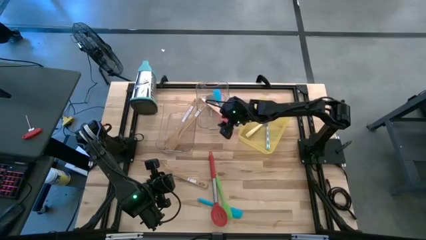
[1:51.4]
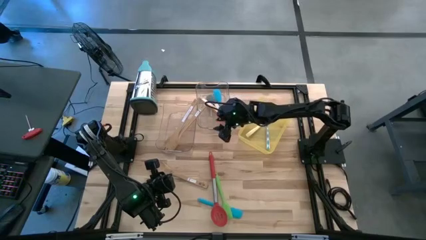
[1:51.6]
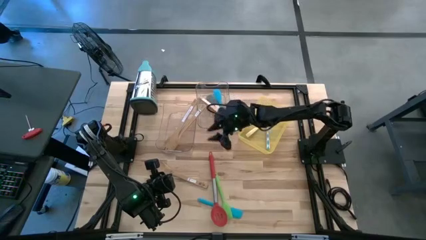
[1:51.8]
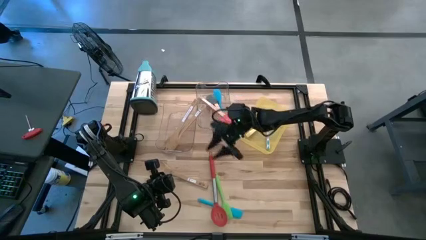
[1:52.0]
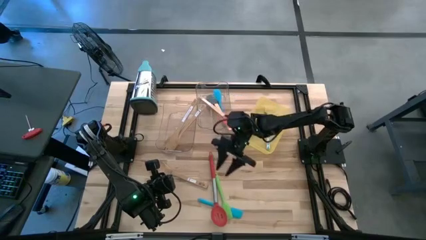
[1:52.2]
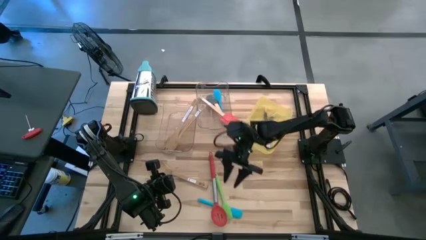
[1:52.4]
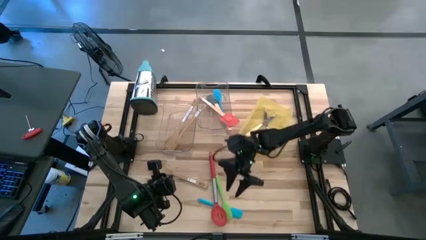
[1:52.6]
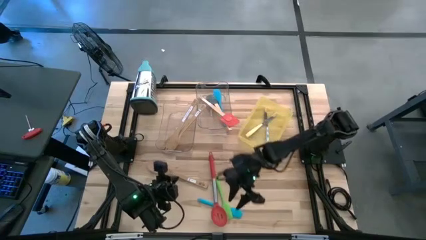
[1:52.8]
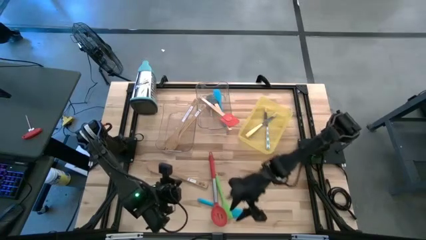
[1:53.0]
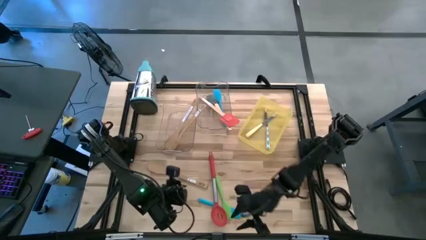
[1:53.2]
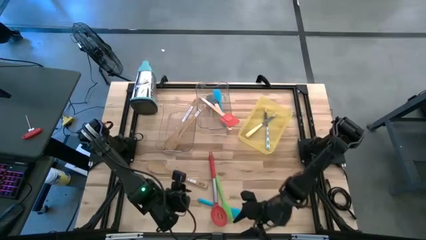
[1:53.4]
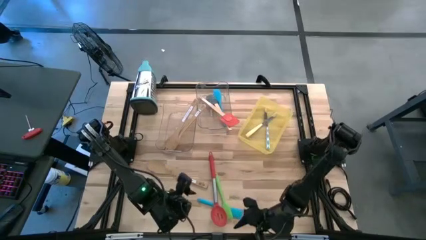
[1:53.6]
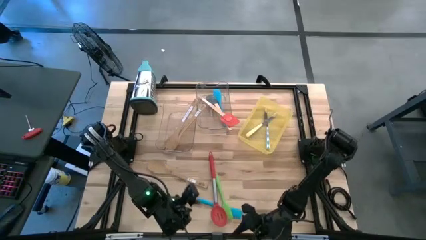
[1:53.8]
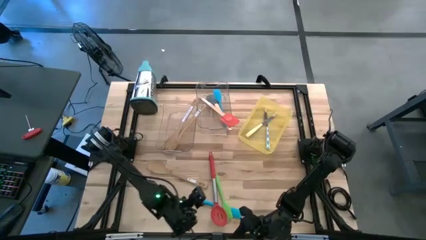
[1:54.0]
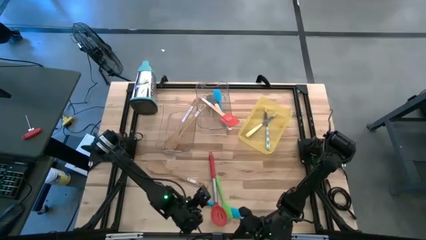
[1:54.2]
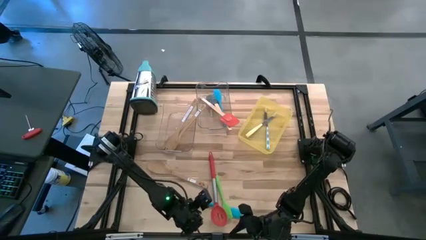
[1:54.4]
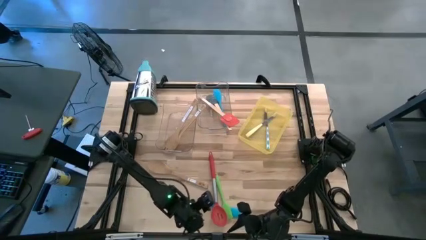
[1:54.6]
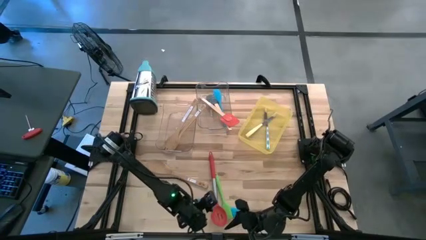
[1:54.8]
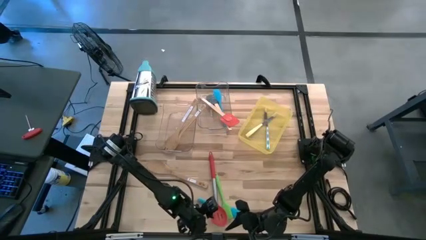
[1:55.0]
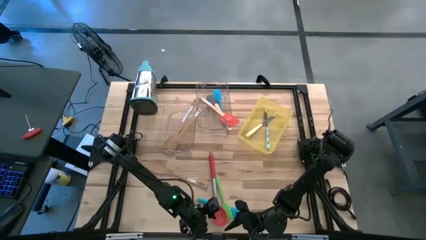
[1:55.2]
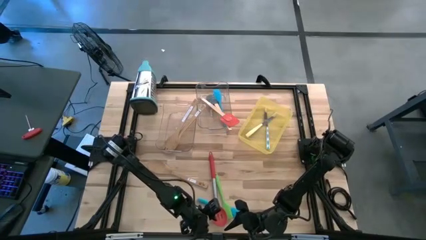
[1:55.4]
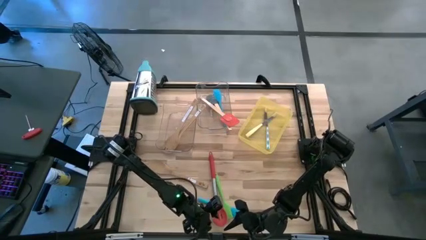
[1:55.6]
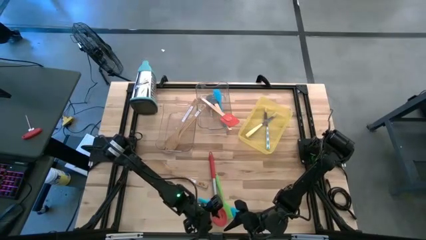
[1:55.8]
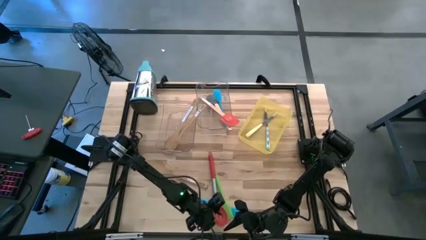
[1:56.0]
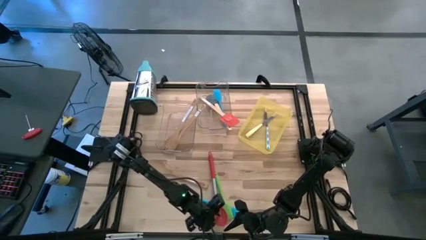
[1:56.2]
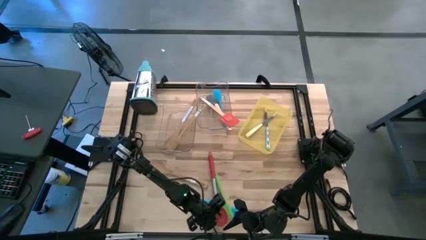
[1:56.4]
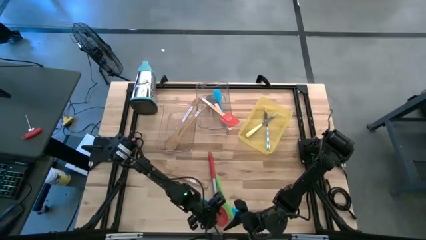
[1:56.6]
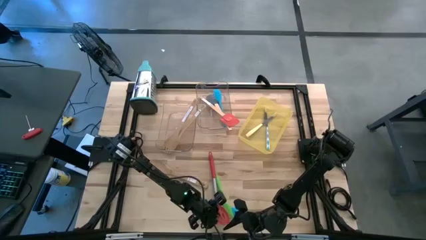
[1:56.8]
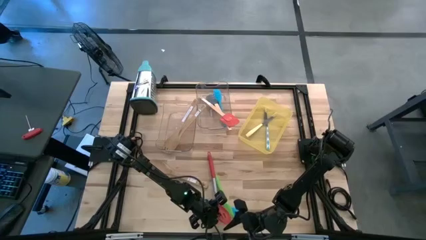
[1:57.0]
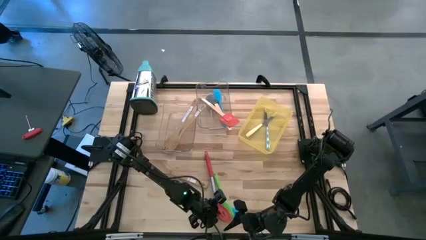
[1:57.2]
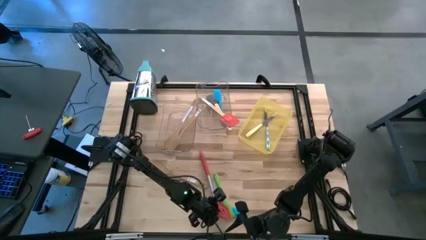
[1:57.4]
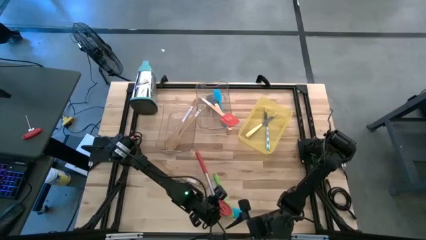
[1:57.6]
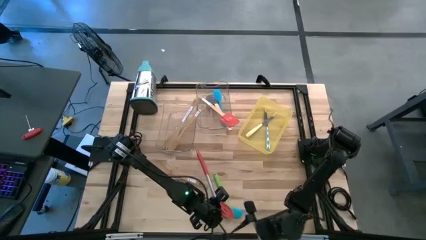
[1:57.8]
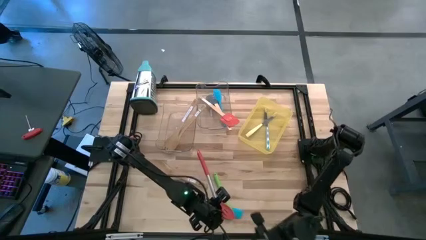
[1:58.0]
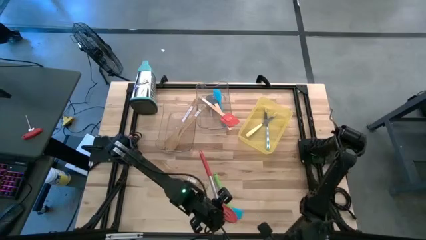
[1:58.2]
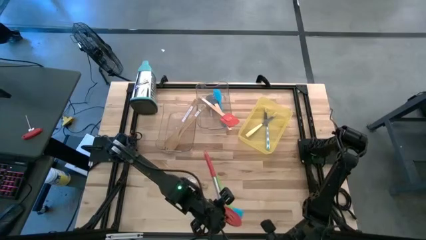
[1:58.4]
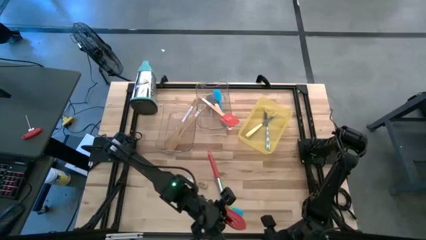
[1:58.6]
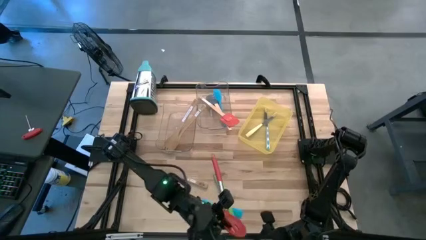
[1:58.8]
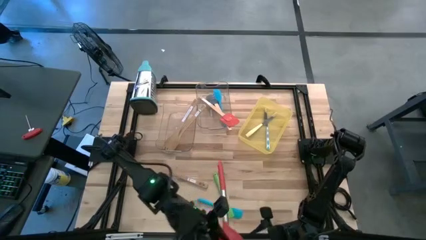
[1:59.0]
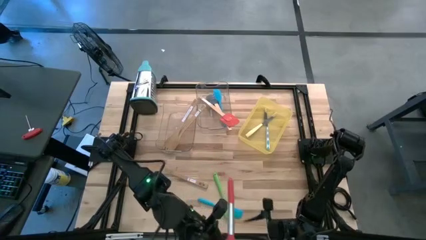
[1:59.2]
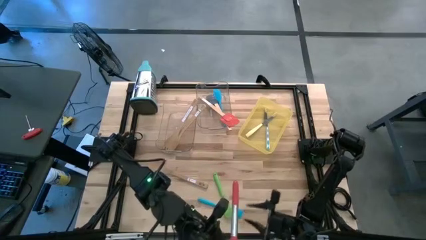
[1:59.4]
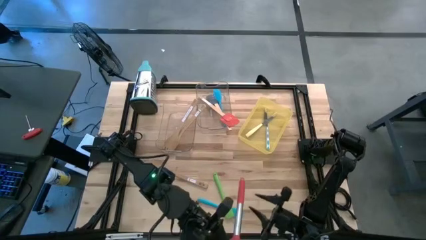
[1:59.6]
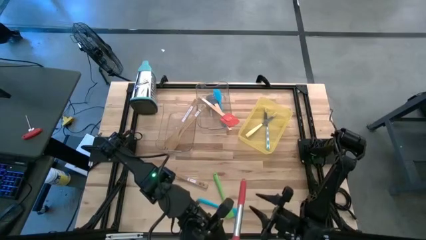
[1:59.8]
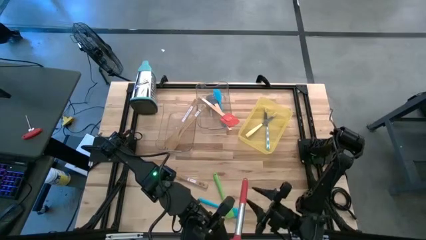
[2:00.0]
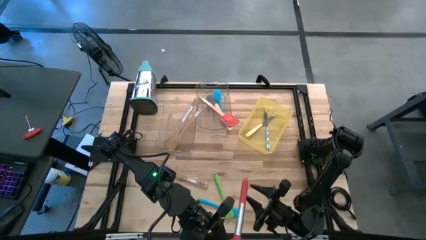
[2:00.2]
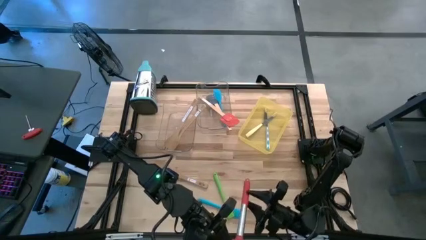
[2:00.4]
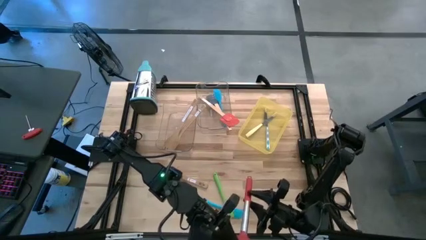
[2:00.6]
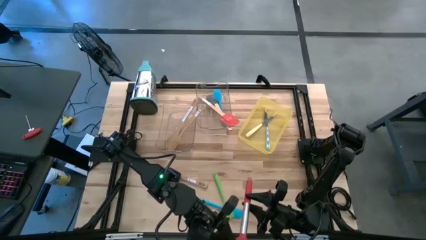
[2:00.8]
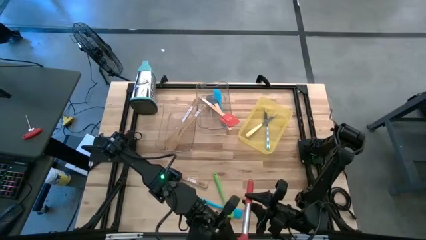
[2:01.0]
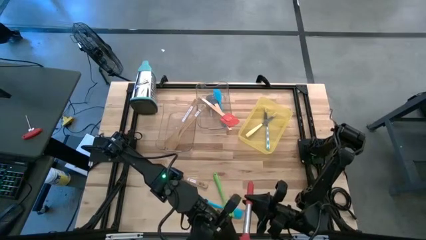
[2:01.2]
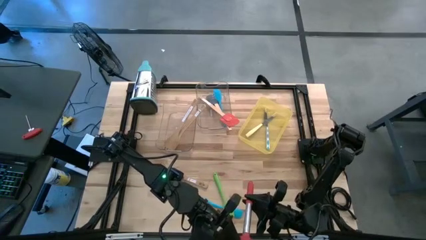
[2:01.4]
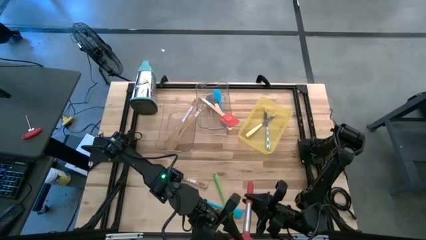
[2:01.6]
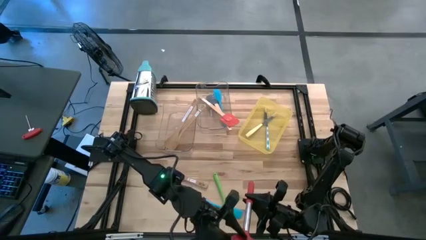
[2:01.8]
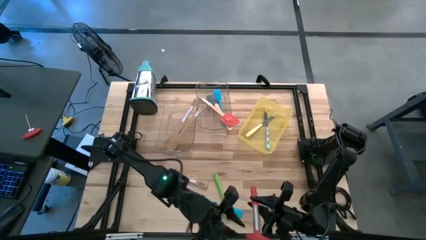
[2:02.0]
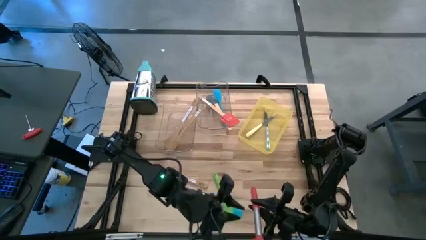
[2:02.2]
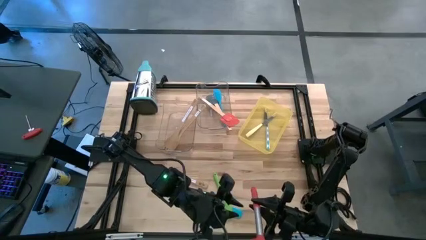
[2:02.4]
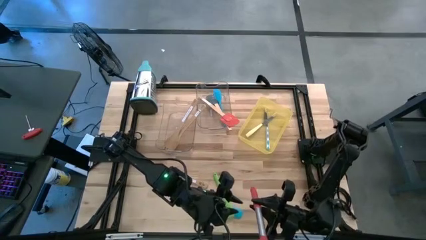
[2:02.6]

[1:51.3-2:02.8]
Task: Pick & Place Kitchen Items
Put the red serving spoon into the left transparent bin

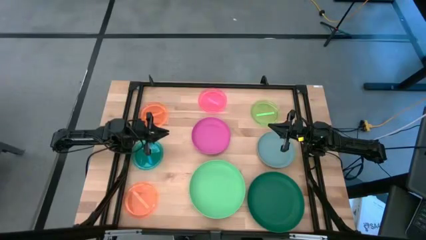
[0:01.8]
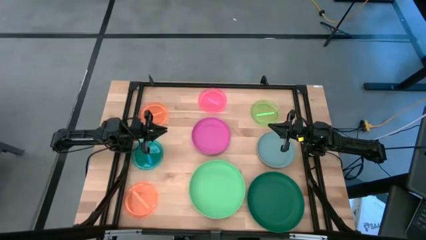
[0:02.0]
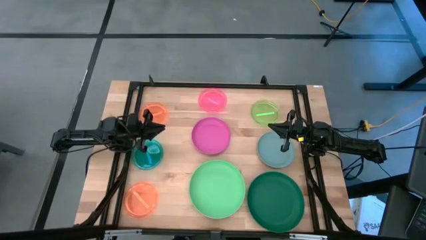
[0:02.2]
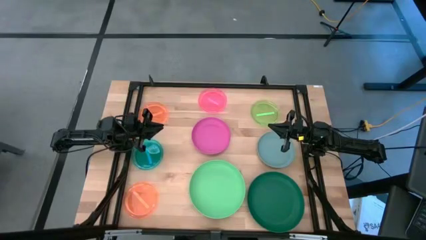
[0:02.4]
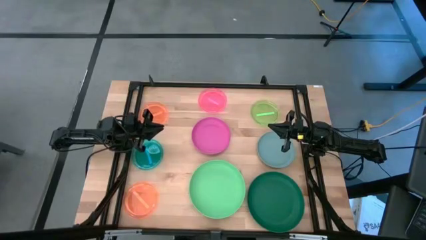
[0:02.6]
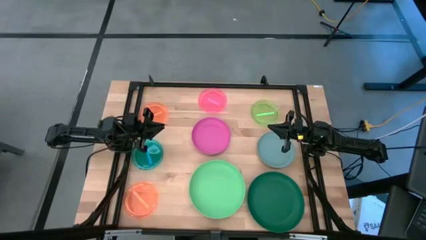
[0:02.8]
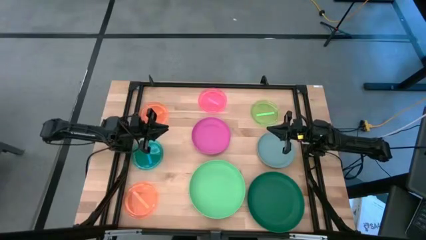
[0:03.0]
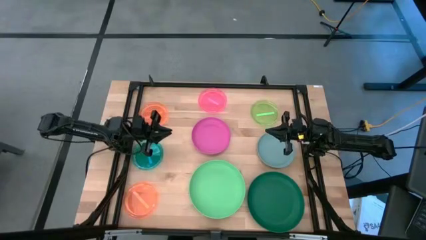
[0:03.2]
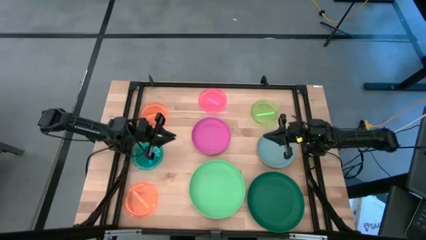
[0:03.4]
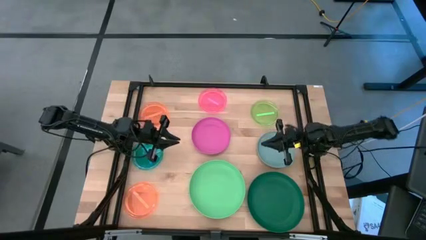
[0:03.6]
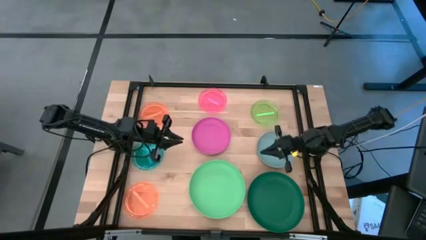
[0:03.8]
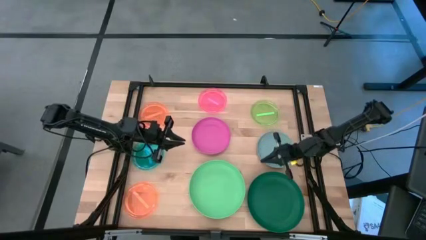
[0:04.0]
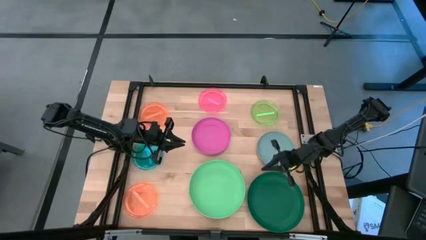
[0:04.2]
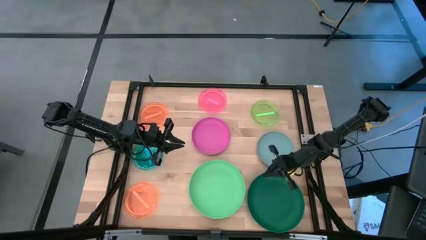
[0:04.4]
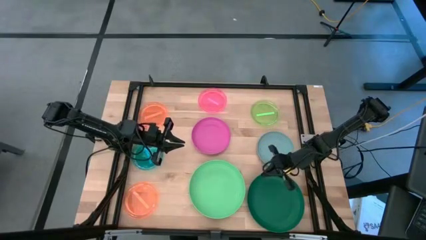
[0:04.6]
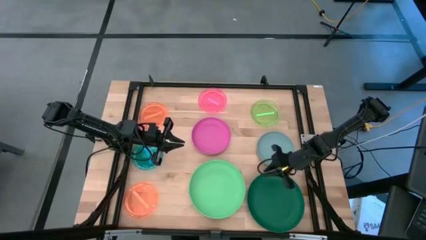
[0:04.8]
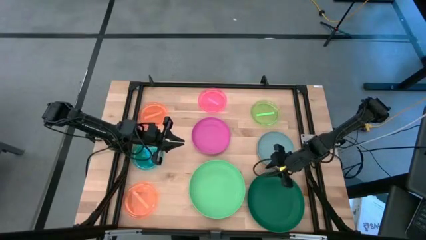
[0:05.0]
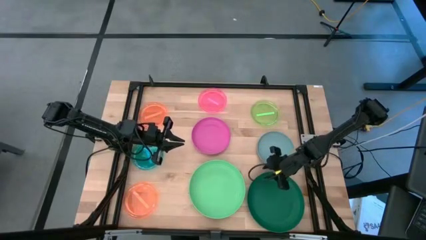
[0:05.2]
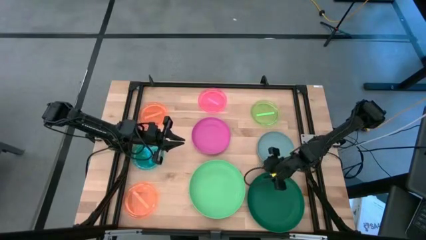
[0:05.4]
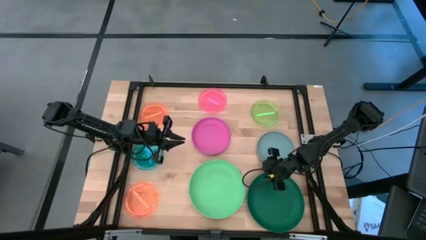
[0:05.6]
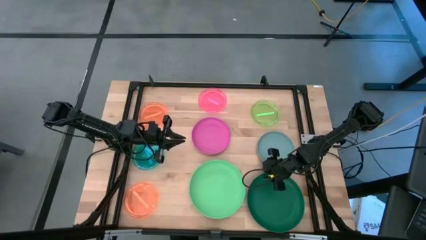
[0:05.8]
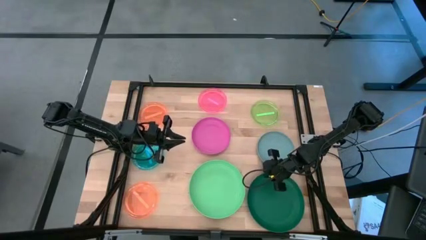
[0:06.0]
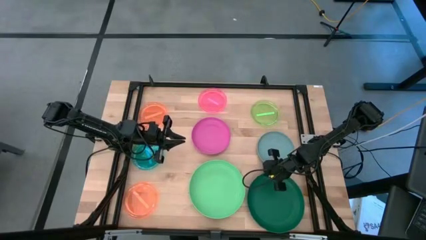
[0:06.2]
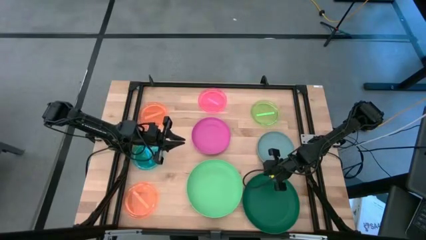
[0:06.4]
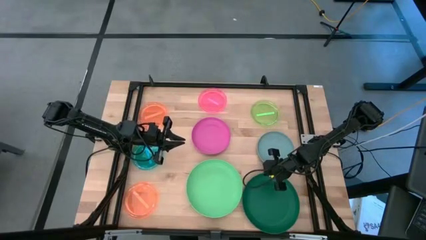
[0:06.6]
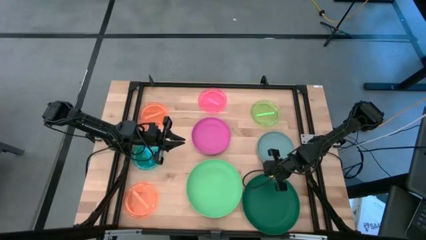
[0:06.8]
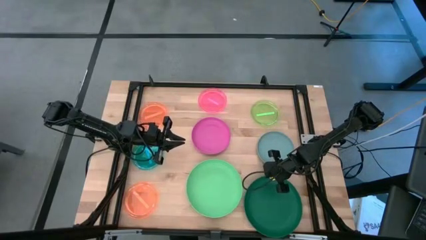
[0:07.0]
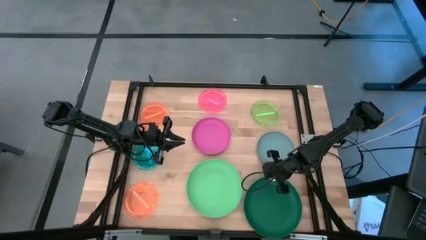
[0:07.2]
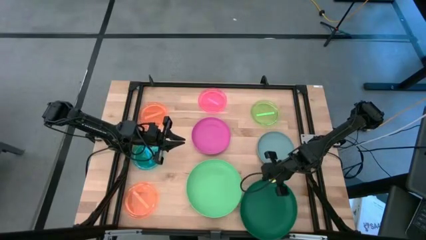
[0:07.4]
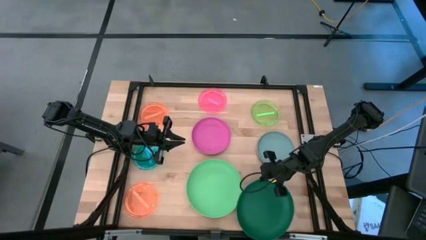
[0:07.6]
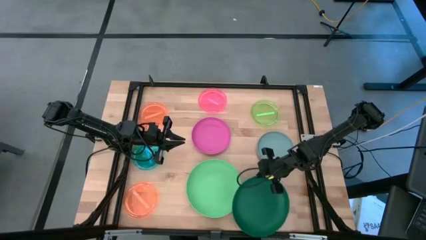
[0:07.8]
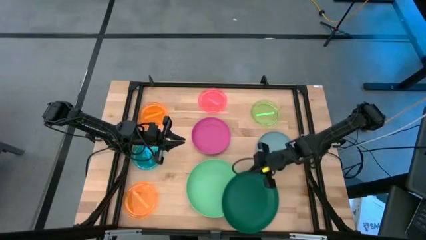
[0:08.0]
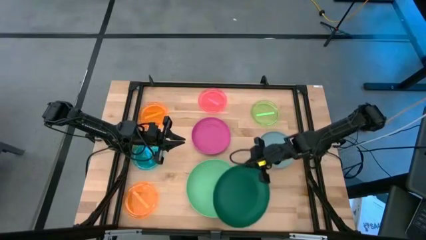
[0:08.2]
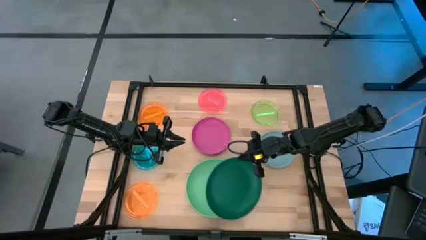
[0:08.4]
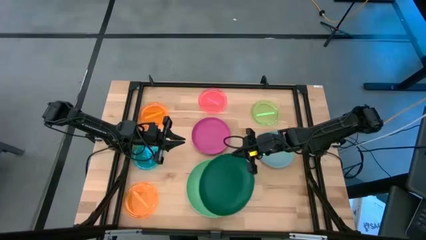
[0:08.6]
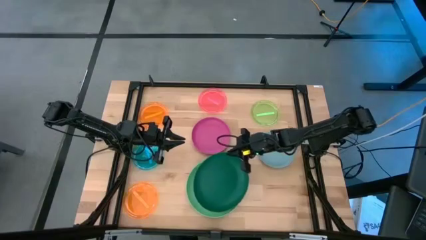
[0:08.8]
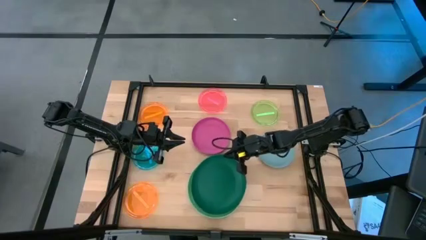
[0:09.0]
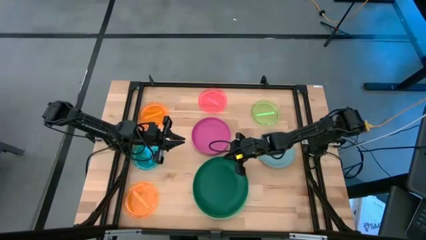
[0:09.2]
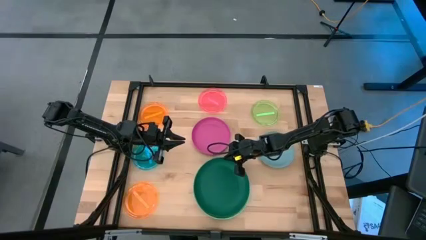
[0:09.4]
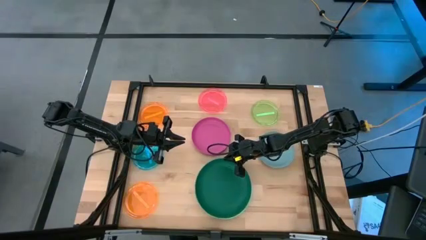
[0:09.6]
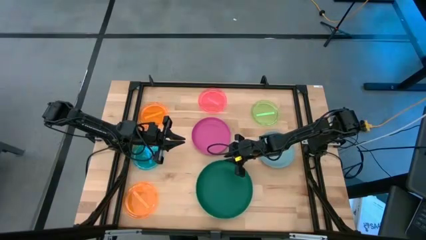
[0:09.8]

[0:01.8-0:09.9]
Task: Stack plastic plates
Stack the dark green plate on top of the light green plate
